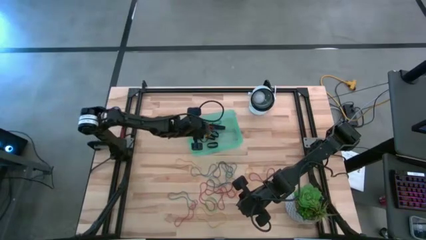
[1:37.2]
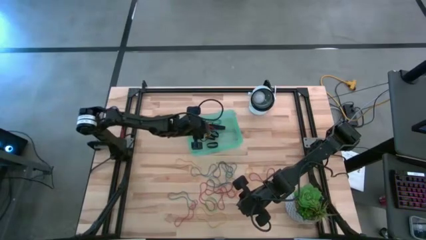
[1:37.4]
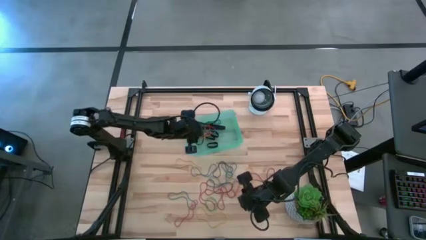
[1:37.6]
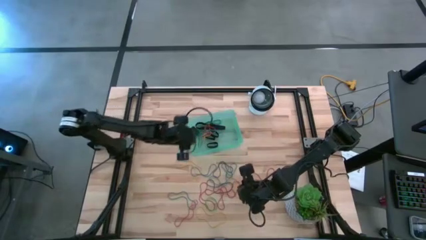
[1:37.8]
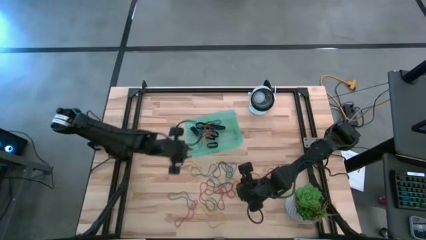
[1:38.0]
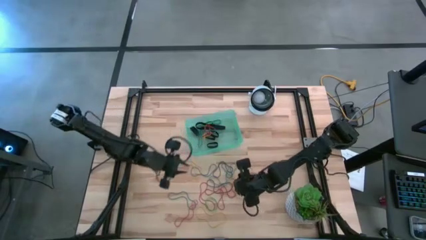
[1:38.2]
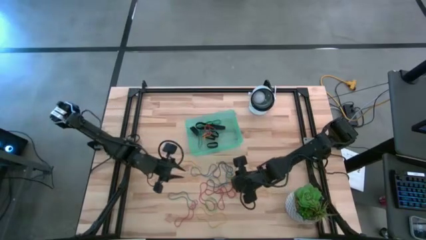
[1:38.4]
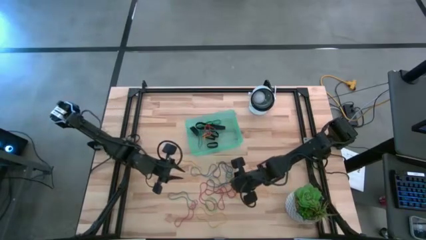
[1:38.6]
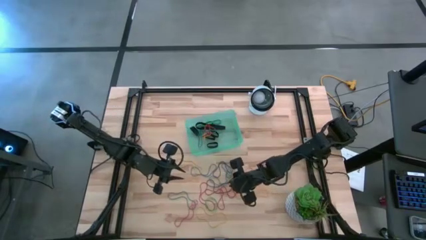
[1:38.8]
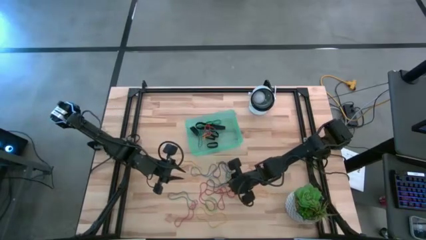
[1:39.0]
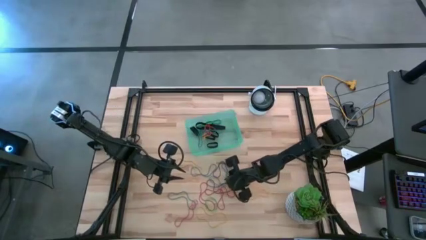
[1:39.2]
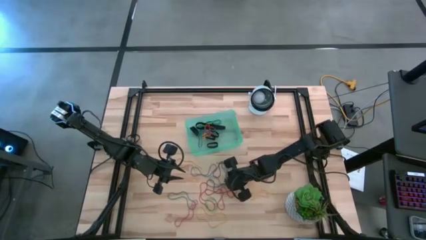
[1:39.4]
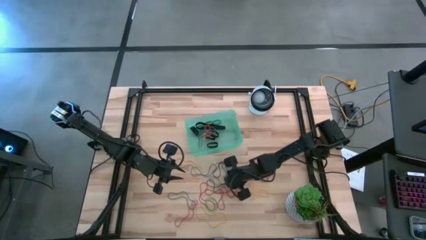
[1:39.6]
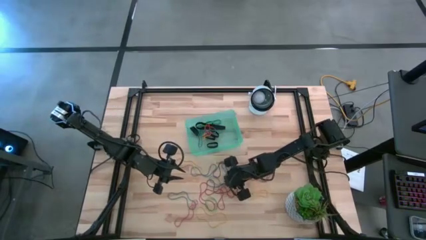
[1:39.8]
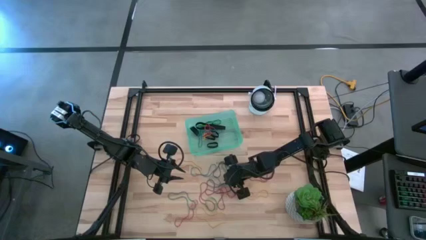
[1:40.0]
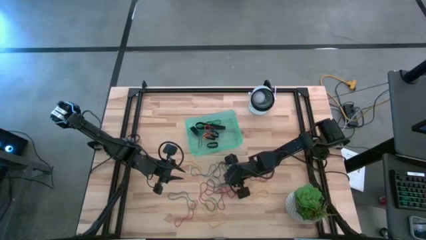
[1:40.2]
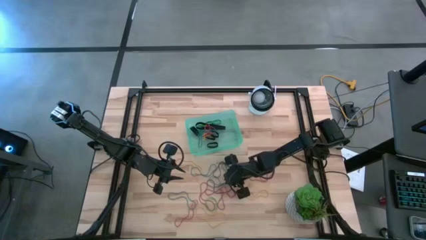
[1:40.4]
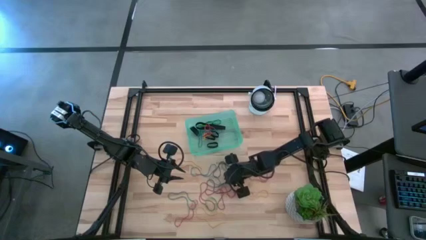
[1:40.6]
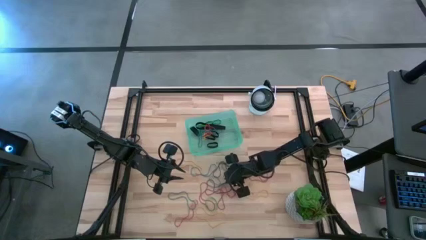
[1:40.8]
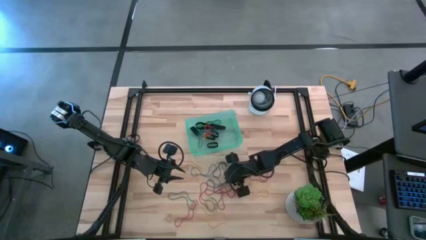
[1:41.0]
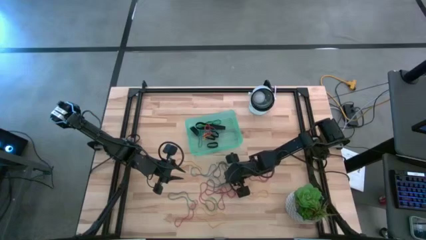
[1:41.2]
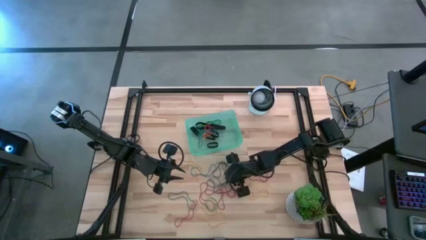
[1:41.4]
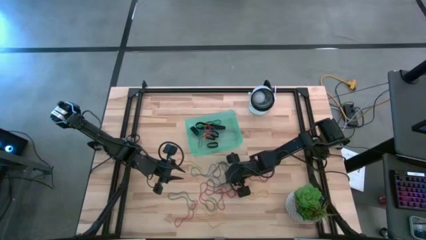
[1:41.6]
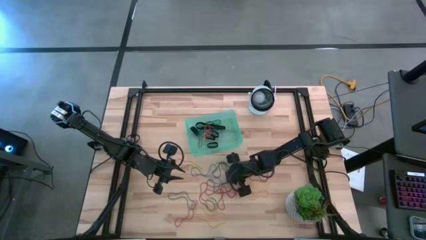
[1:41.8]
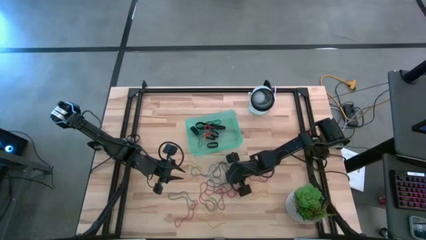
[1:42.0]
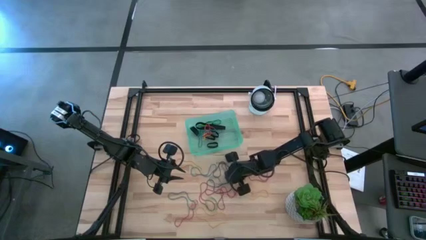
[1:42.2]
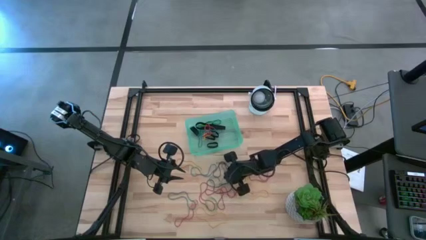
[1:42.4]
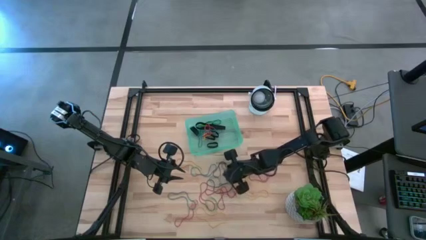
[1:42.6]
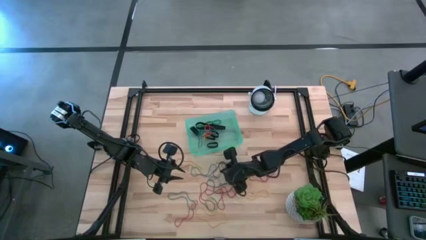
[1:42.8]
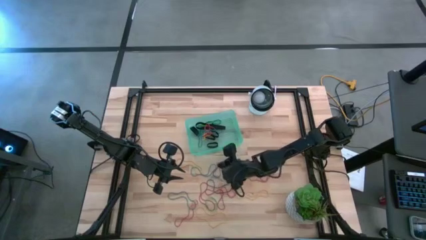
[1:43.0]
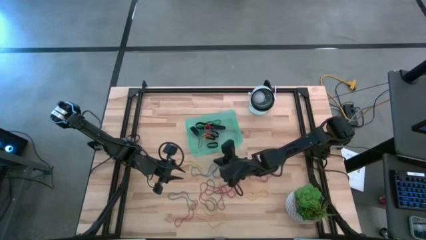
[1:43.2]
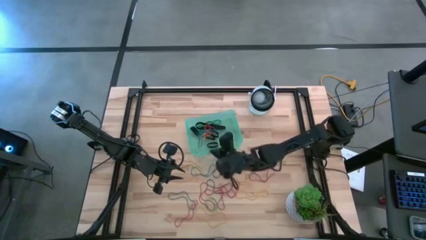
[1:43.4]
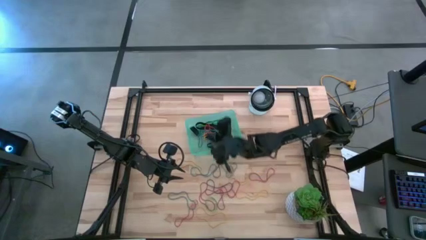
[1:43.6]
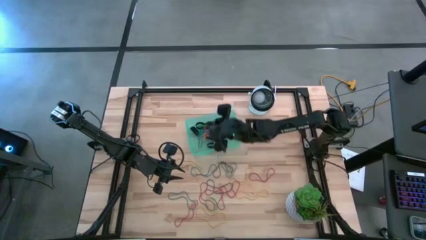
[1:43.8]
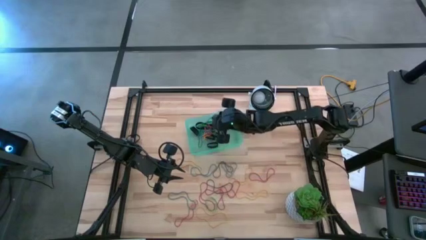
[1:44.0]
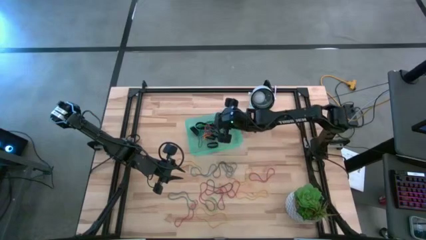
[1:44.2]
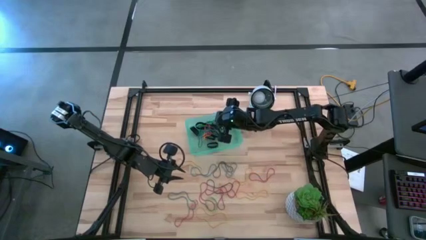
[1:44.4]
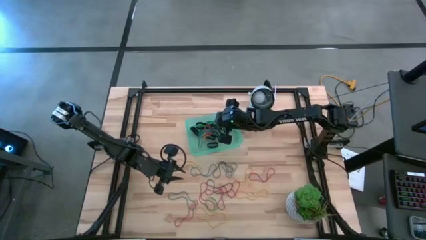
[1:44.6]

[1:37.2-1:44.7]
Task: Pick and place rubber bands into bin
Put the blue rubber band into the green bin

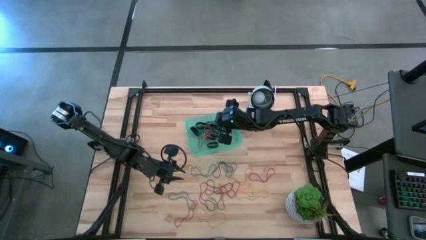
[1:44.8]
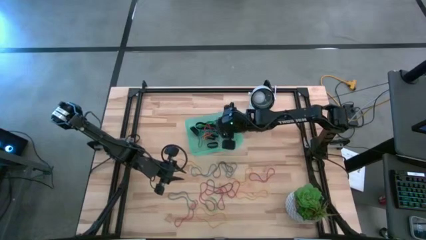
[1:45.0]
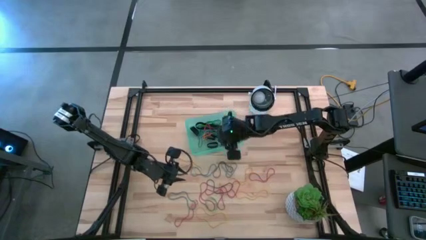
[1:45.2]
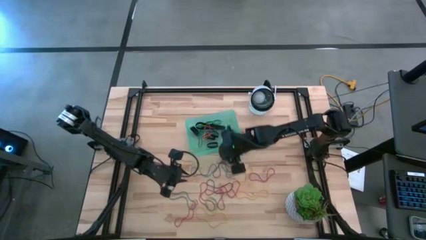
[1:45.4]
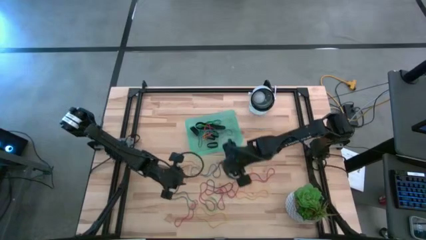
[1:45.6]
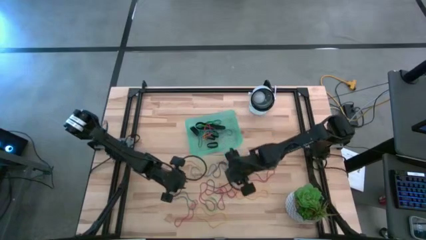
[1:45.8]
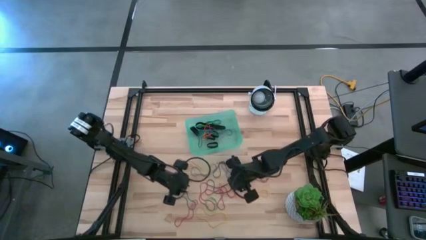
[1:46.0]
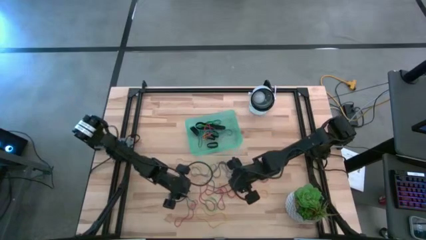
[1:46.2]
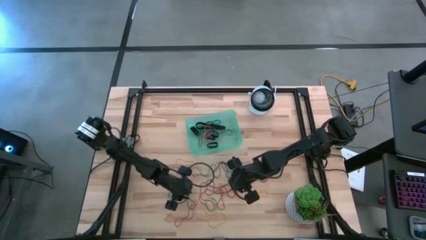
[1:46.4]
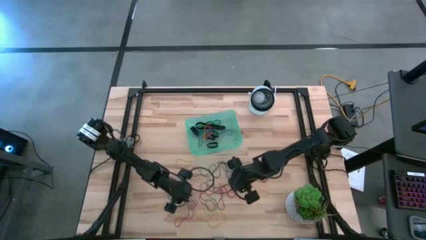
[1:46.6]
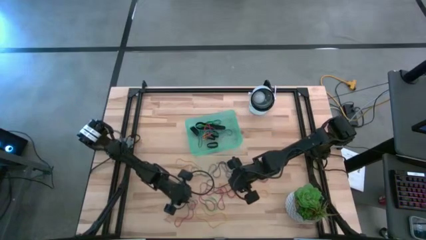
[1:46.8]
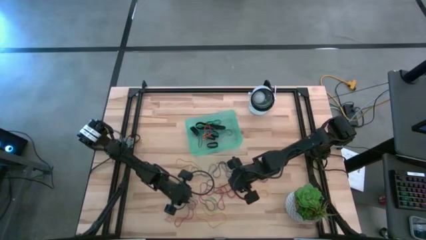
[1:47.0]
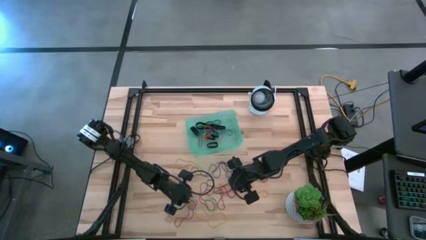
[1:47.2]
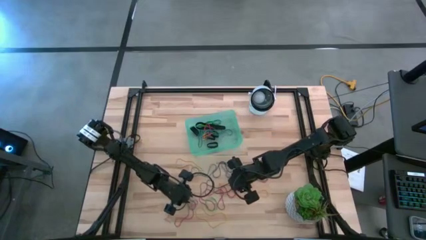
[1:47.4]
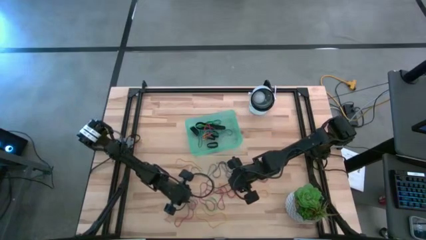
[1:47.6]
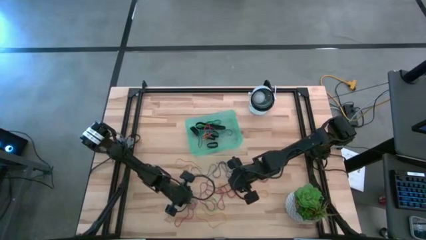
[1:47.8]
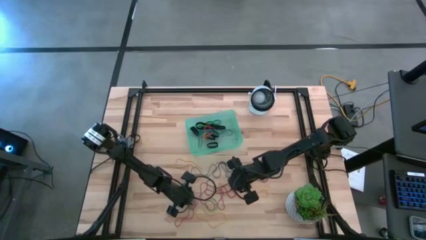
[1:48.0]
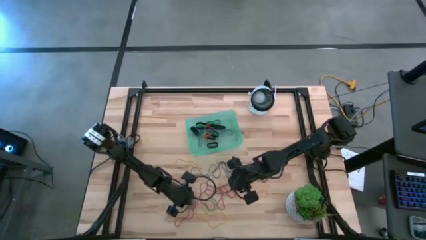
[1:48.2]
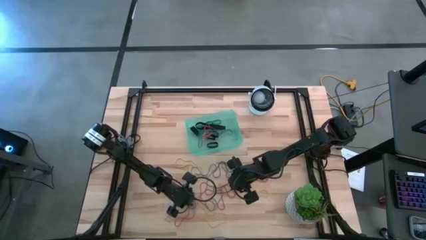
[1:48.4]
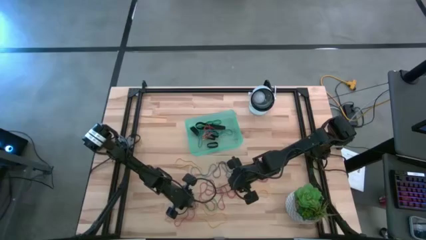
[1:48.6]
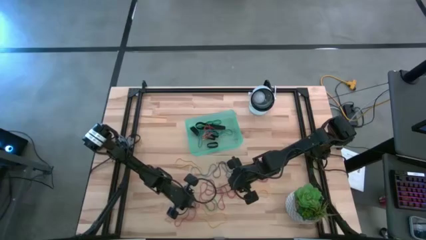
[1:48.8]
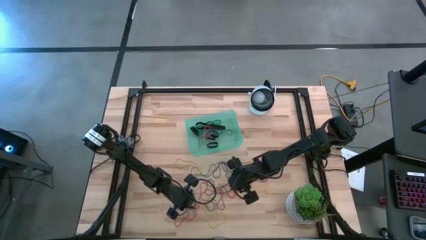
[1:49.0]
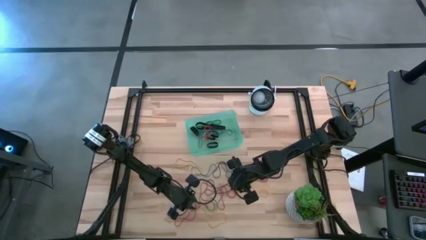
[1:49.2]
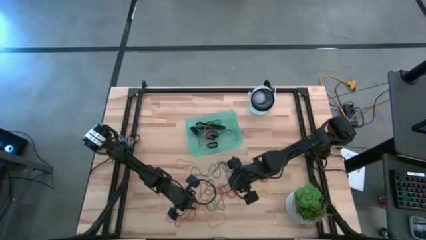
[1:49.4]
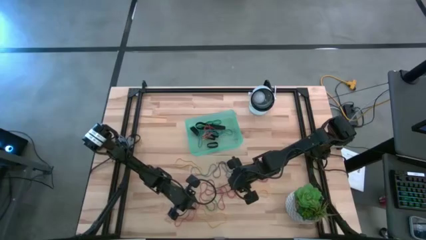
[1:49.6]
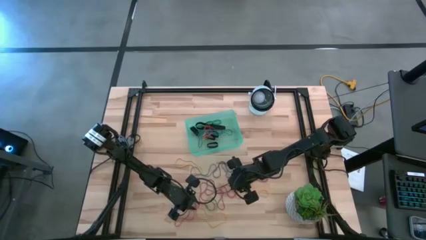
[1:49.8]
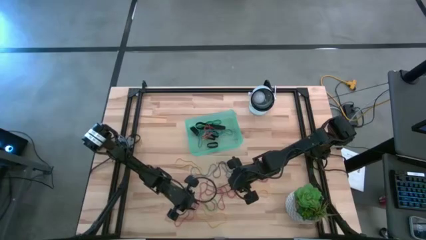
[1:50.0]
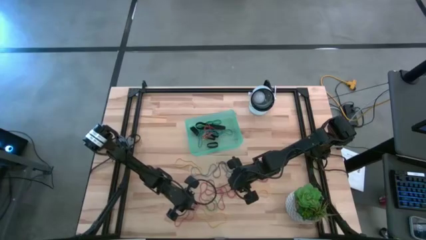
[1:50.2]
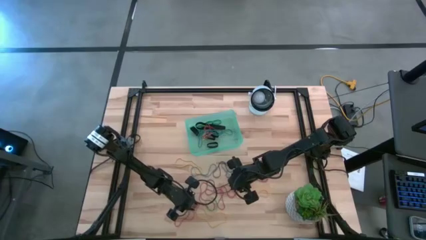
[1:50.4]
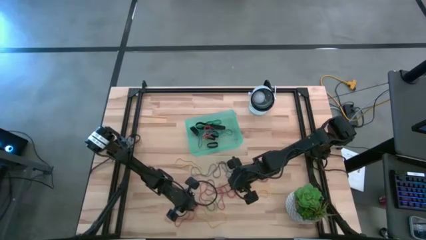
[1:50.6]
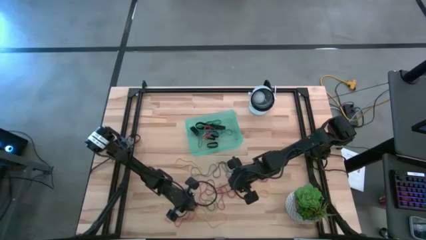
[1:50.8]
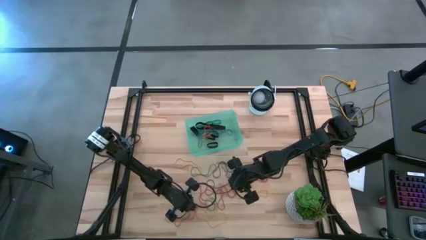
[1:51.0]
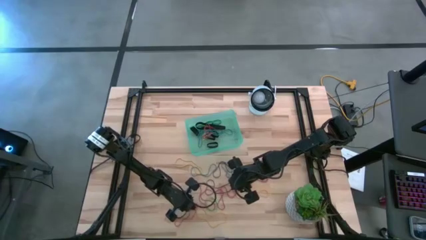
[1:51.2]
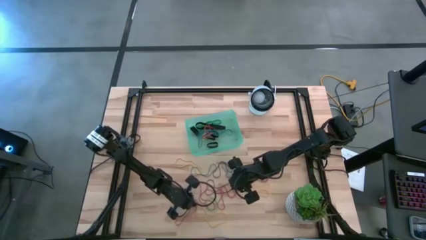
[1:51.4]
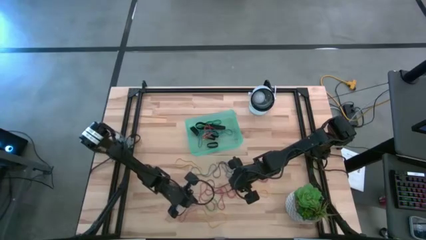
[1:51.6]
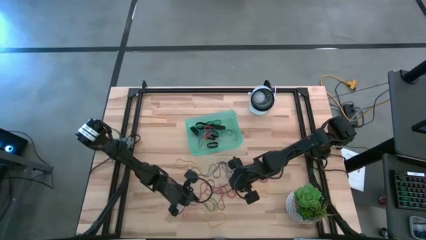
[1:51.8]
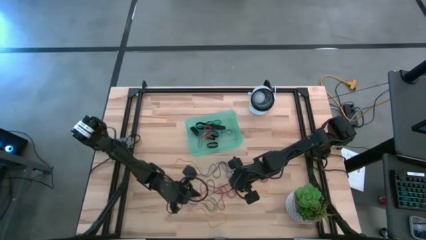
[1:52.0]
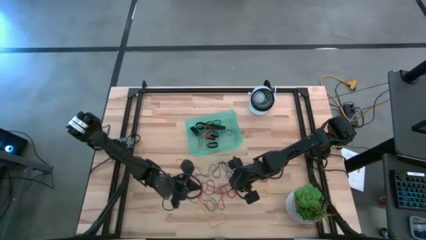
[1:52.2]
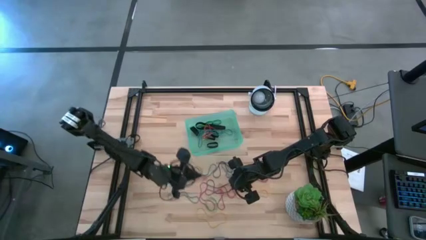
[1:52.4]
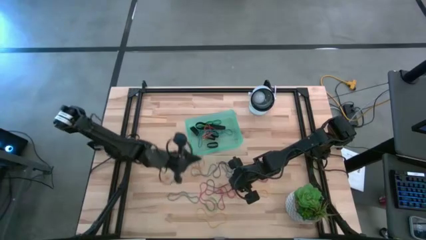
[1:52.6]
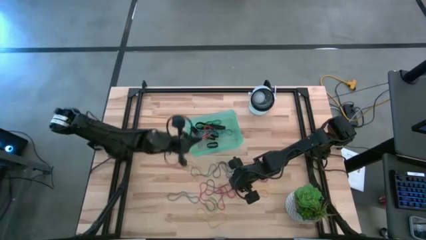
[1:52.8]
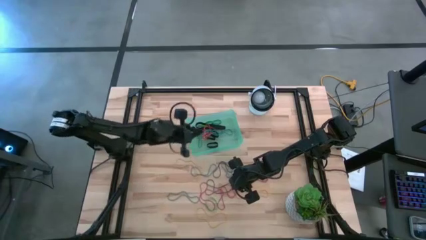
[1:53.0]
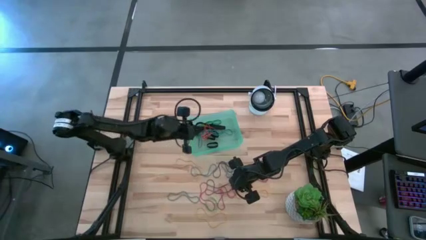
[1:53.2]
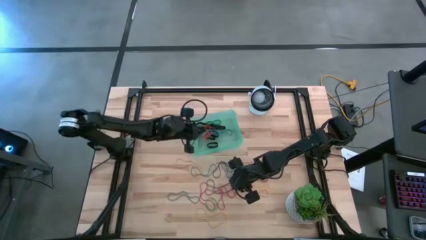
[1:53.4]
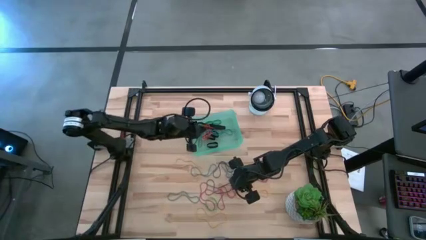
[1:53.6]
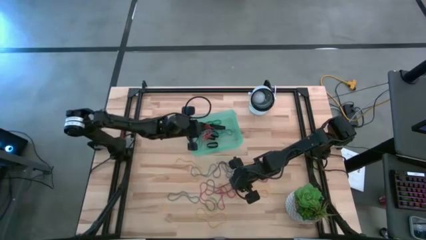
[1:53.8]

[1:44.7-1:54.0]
Put the red rubber band into the green bin
